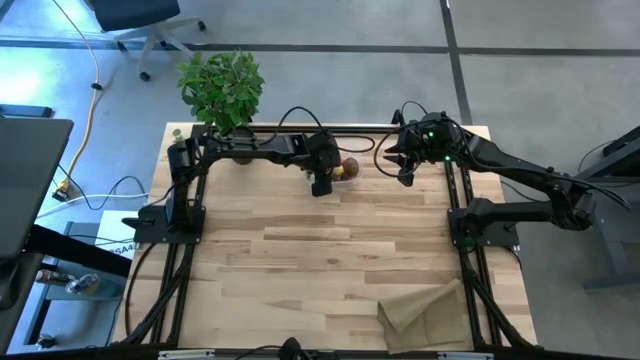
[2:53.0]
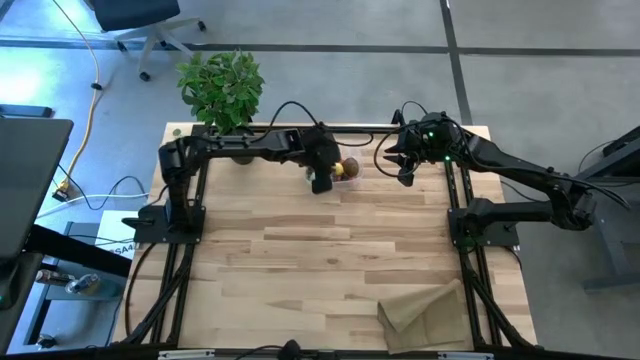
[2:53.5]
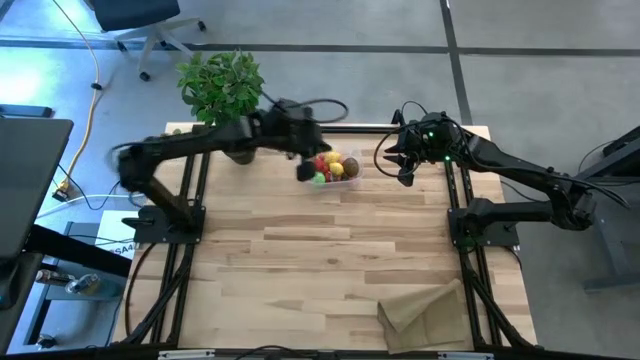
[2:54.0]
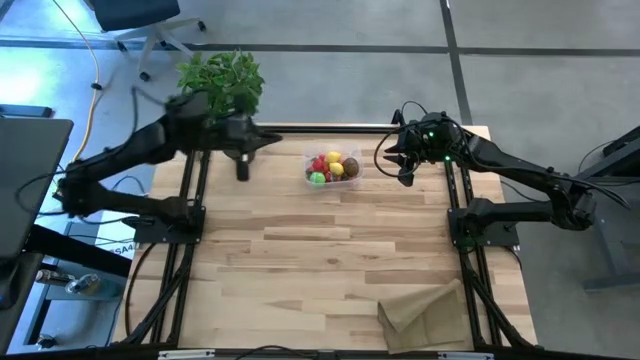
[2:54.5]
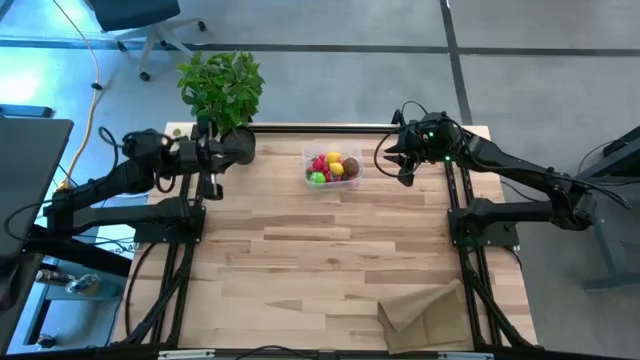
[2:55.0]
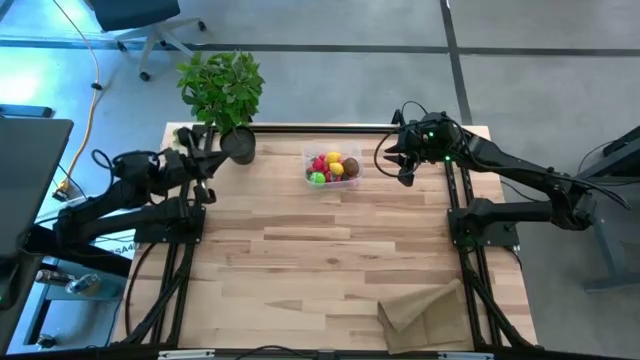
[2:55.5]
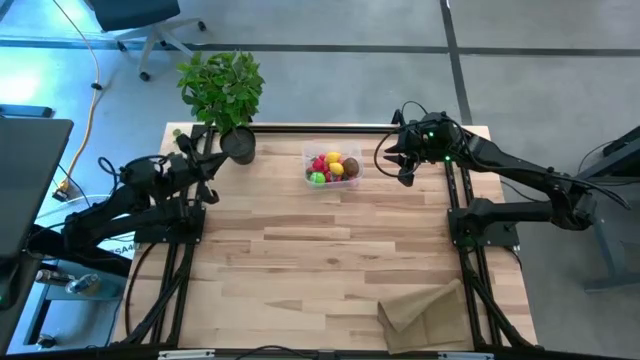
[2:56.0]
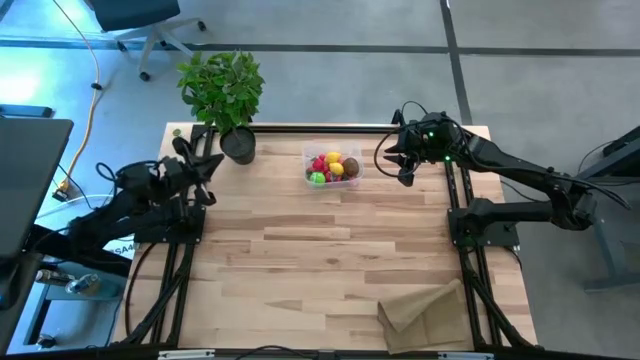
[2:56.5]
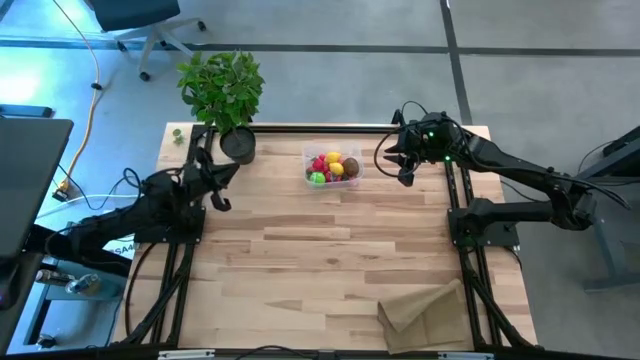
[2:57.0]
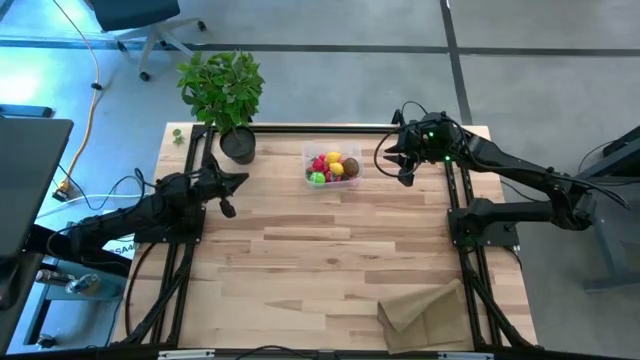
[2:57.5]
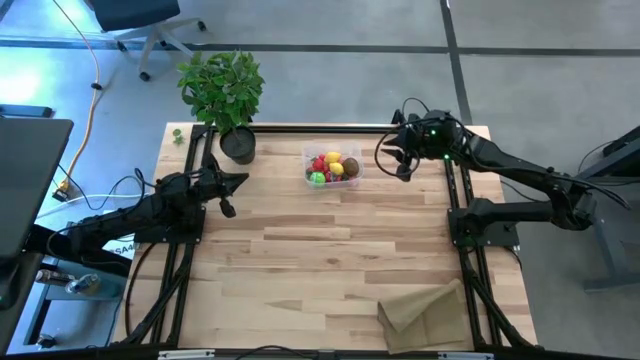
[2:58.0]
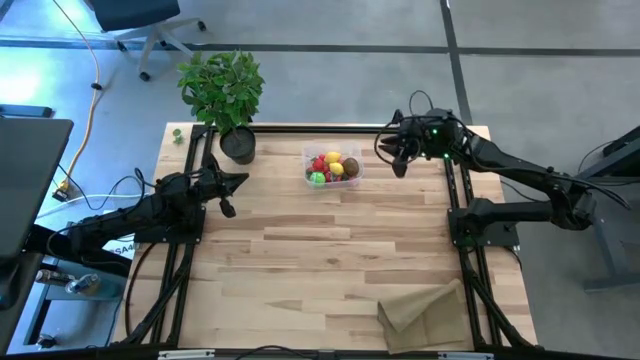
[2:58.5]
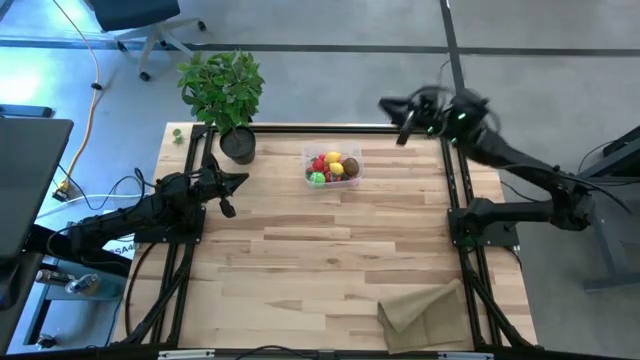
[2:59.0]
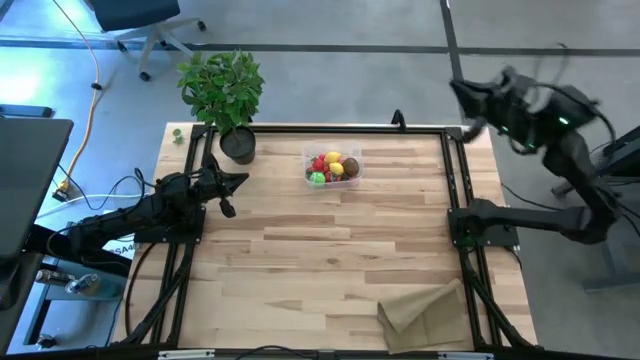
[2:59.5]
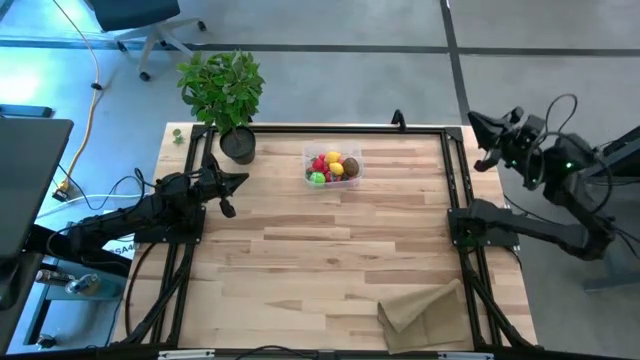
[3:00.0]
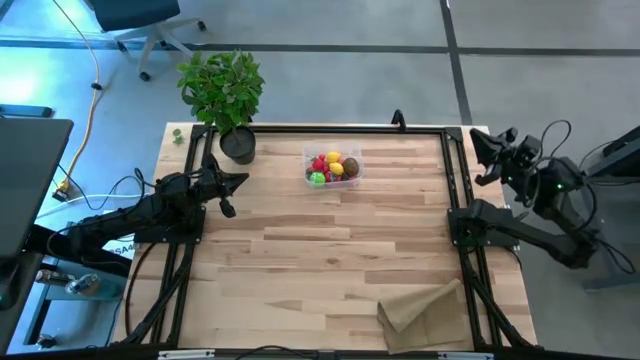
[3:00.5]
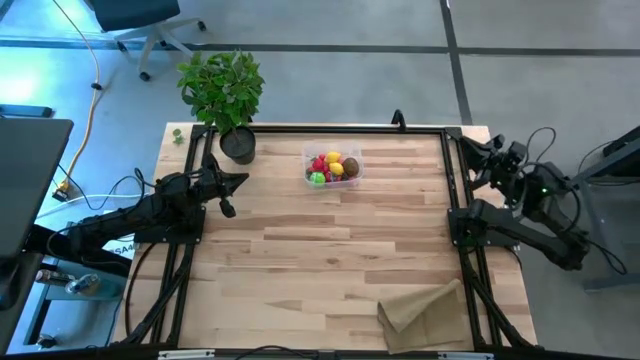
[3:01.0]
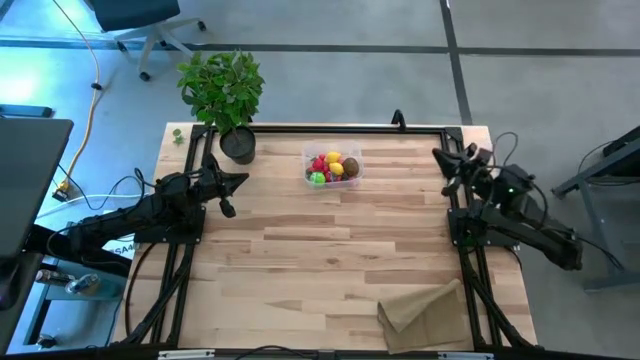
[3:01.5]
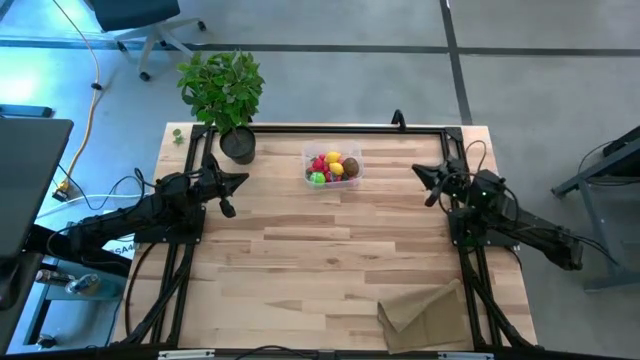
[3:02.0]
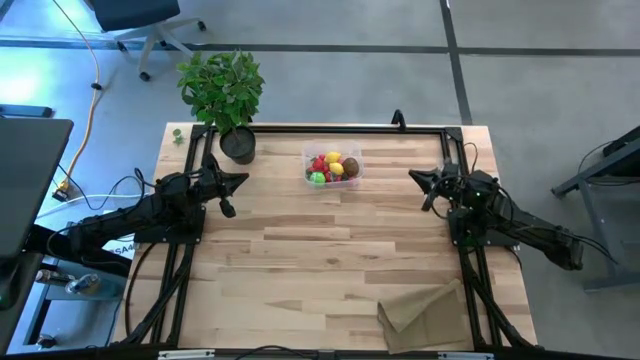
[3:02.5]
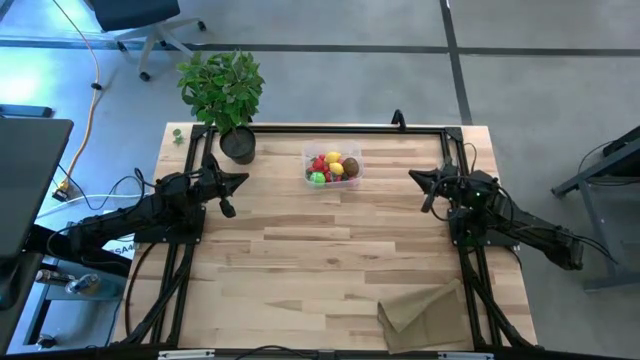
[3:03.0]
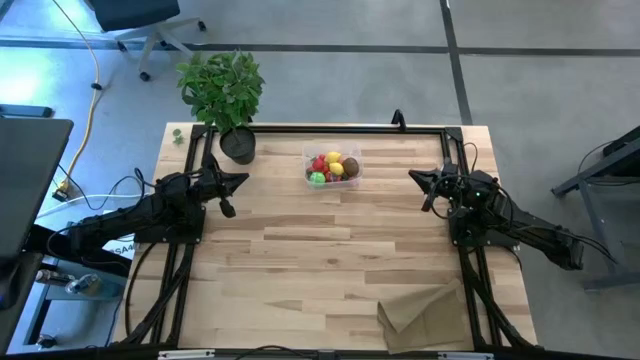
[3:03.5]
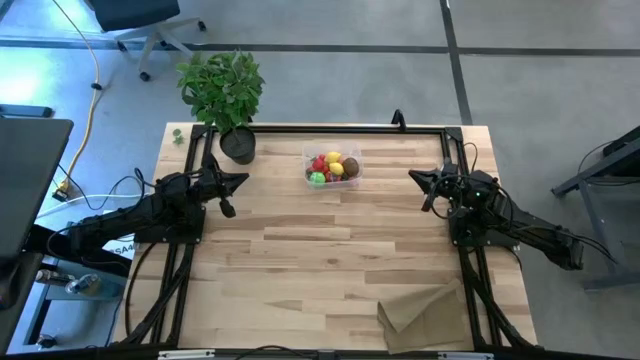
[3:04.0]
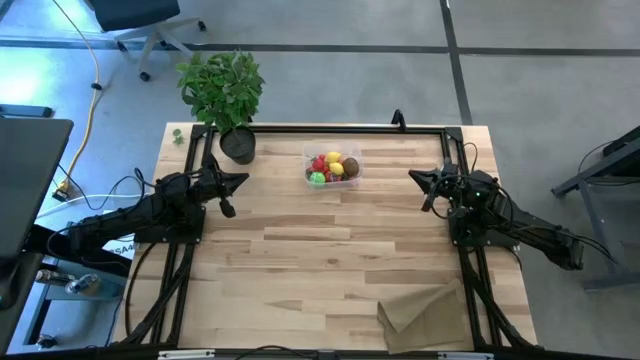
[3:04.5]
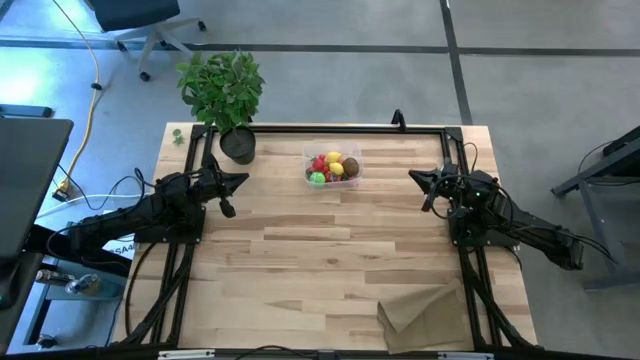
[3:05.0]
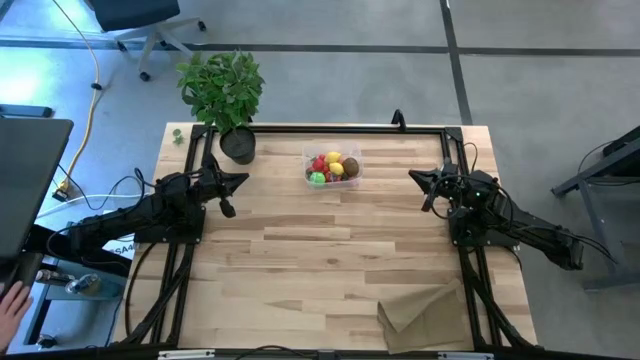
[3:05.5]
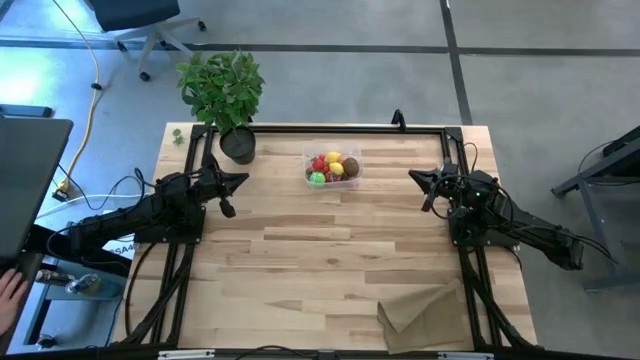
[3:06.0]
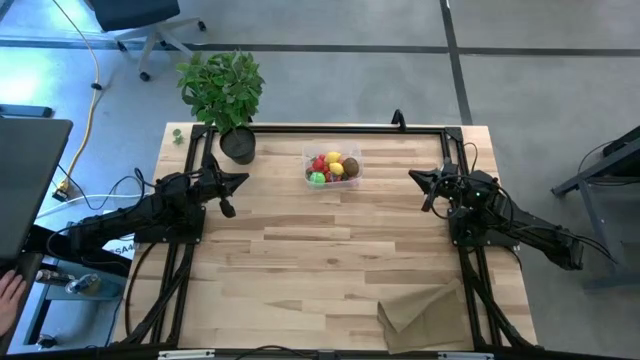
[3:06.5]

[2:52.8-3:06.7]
Task: Pick and placing Produce into tupperware
Return to Home Position

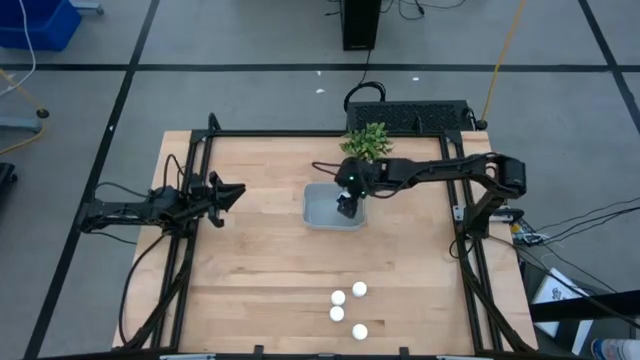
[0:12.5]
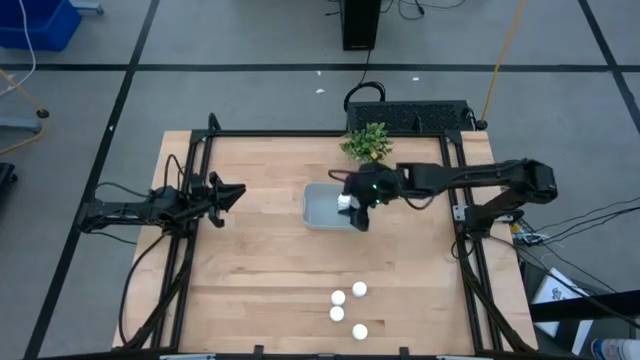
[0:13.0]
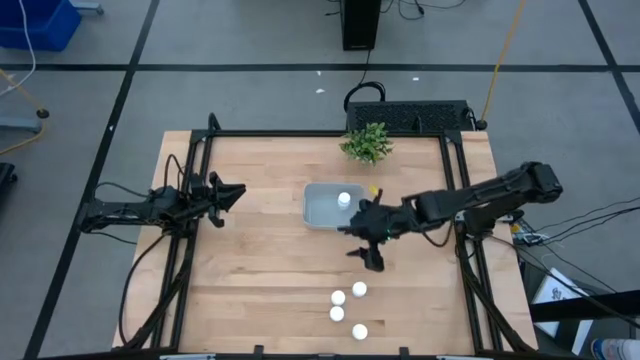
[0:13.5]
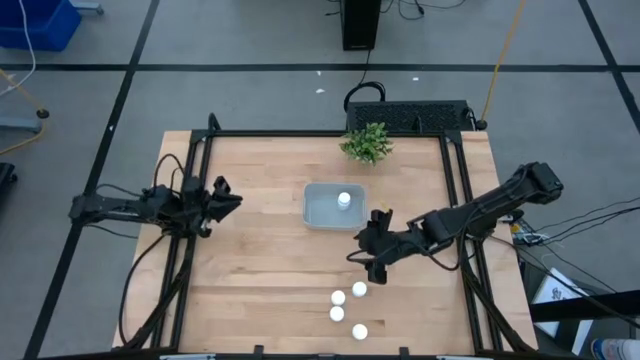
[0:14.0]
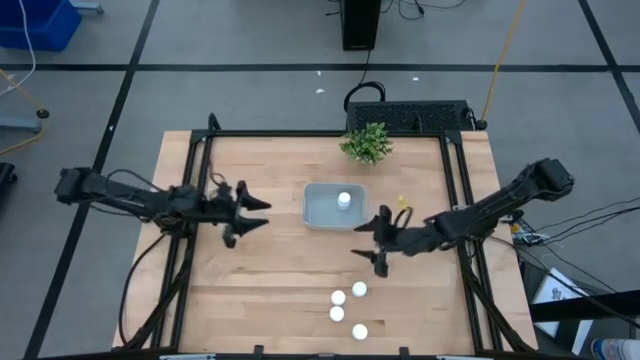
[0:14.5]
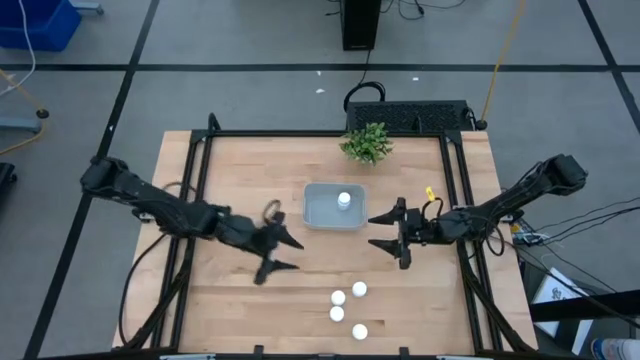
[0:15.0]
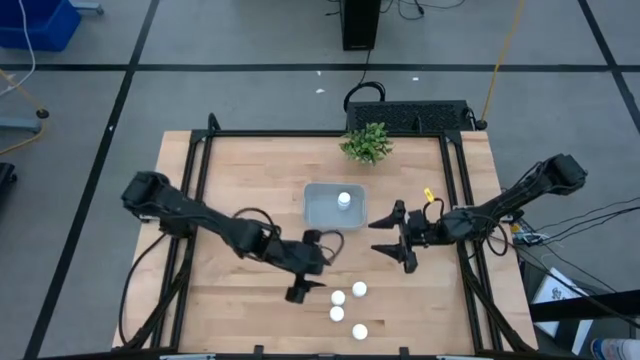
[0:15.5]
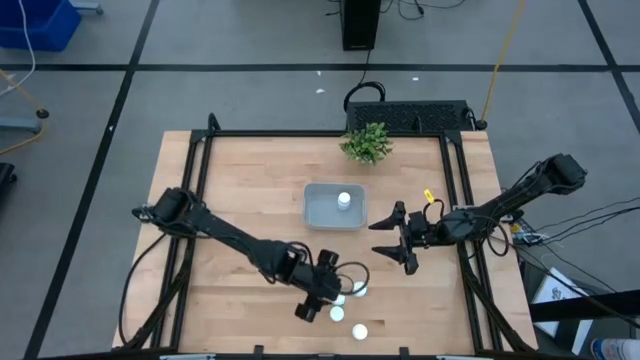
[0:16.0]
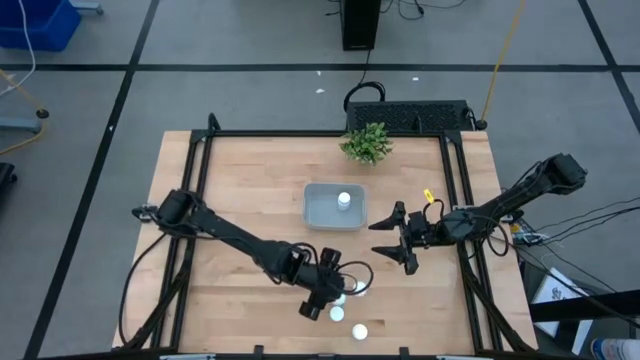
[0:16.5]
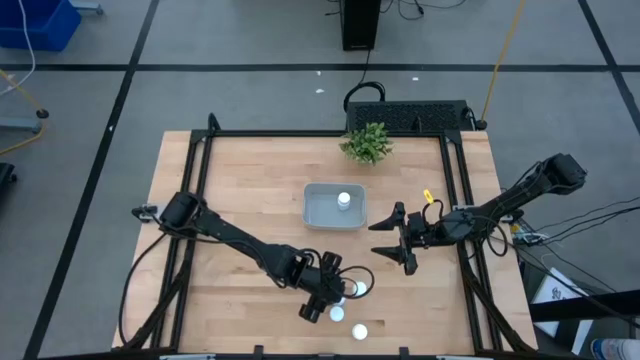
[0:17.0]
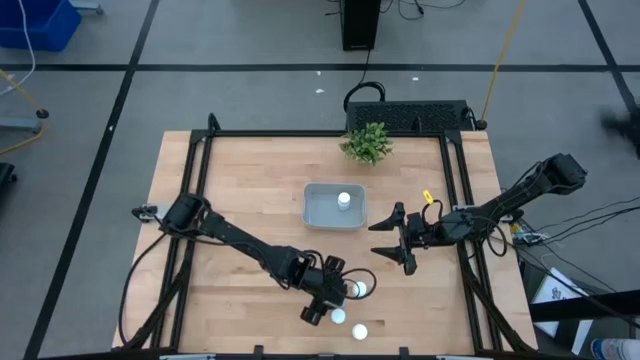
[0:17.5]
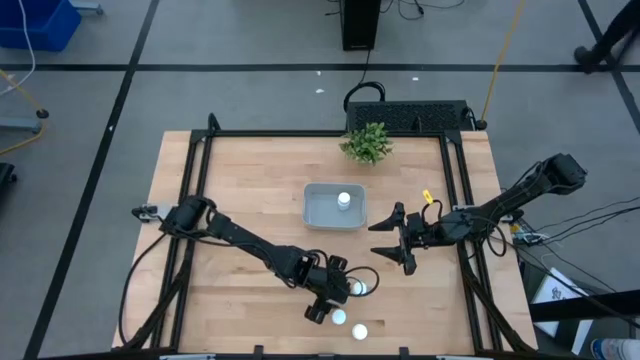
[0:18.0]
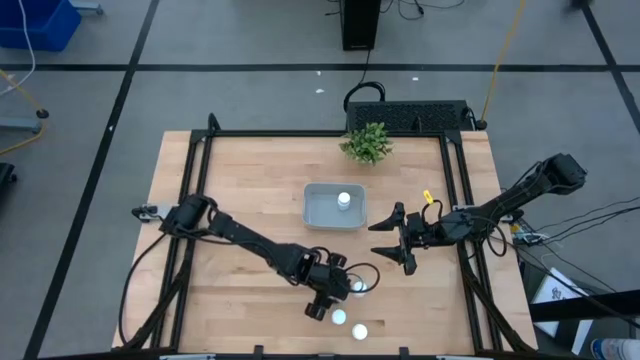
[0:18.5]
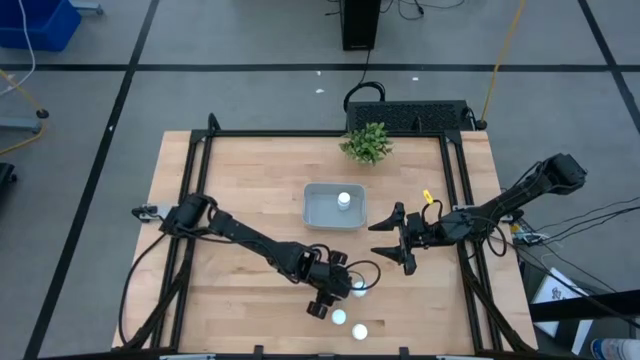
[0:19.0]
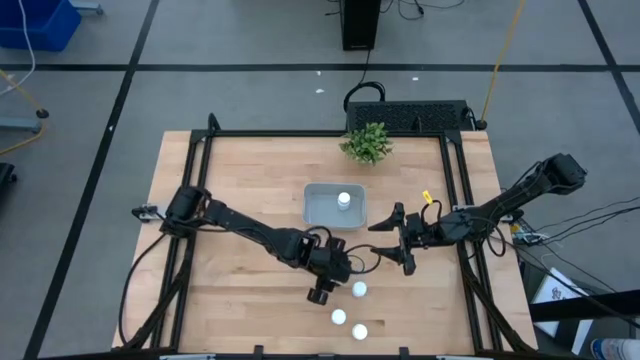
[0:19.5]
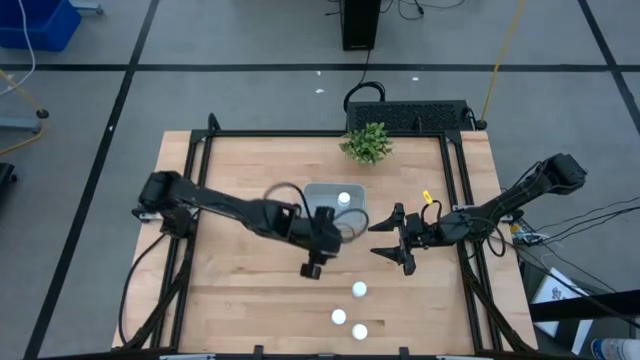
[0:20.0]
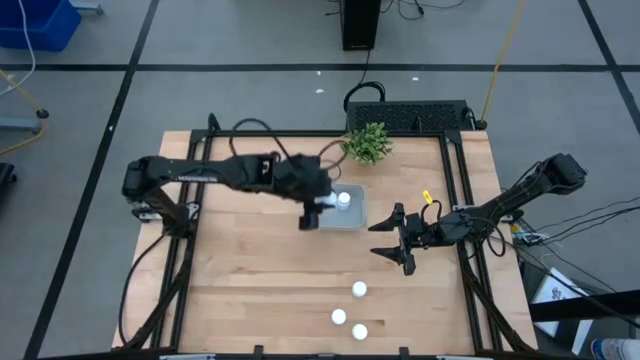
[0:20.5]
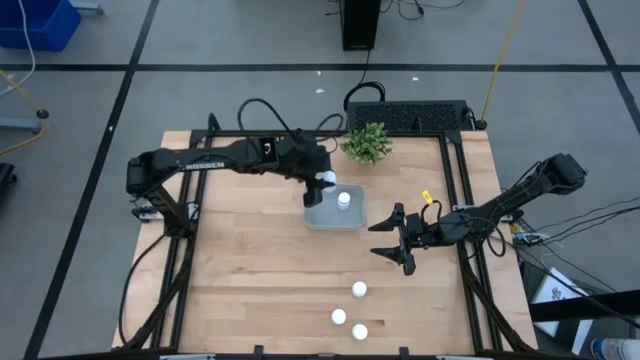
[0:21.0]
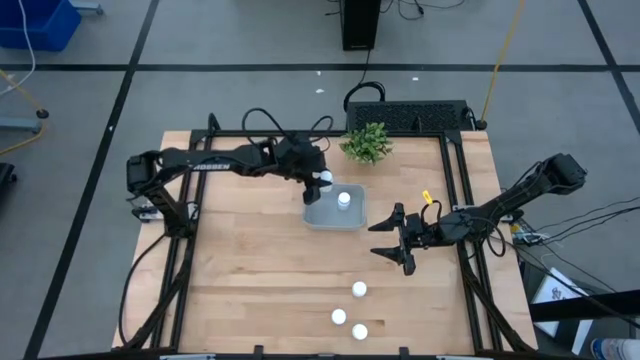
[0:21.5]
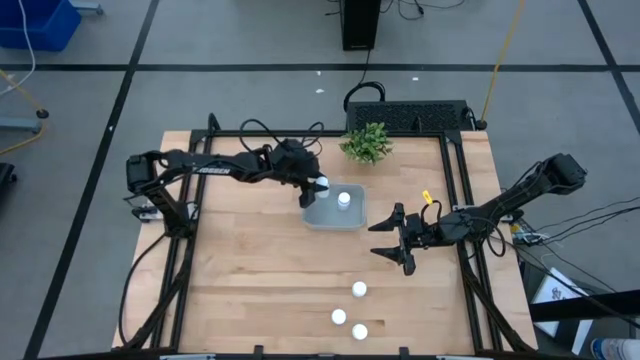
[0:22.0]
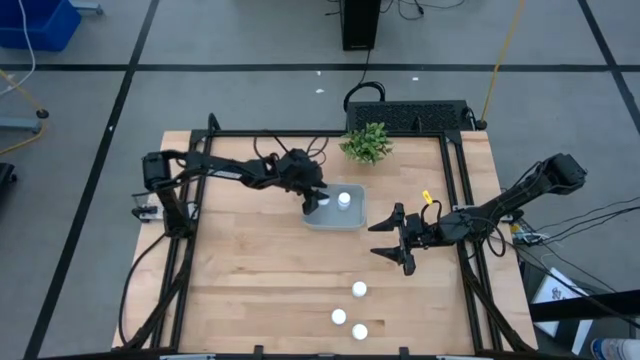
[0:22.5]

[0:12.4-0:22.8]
Task: Pick and place pill bottles into a basket
Put the white pill bottle into the gray bin
